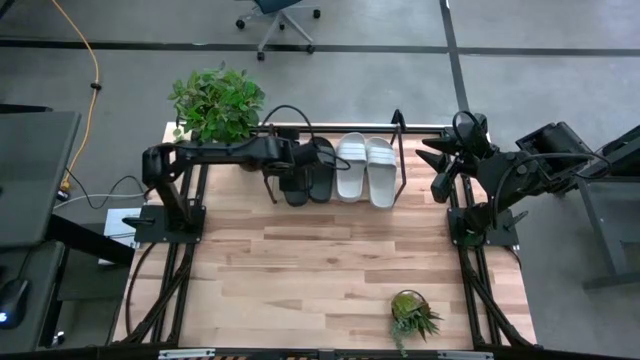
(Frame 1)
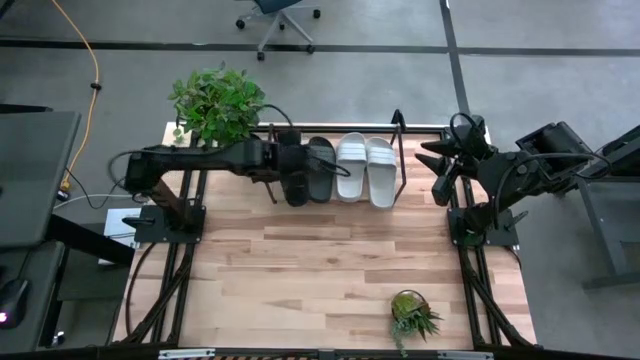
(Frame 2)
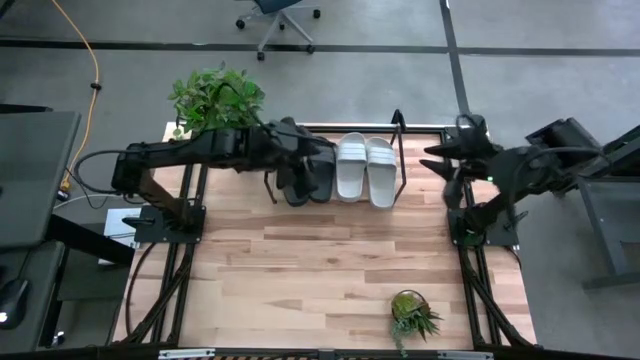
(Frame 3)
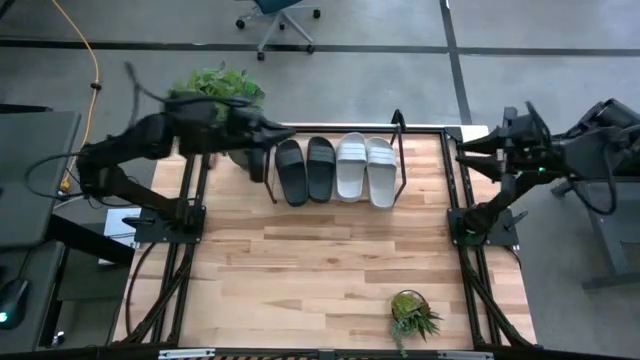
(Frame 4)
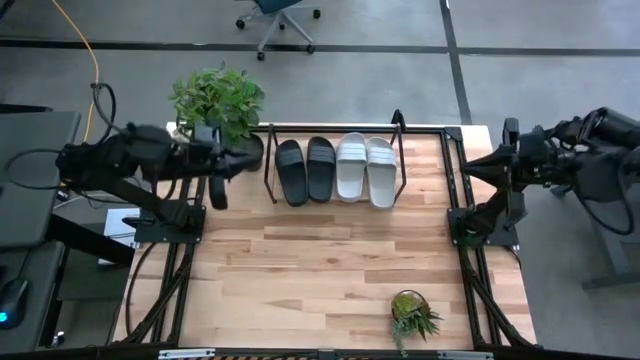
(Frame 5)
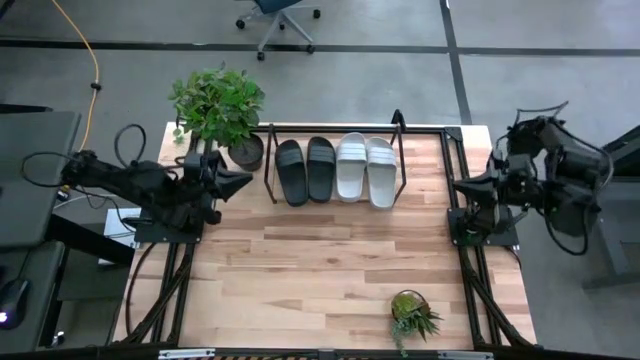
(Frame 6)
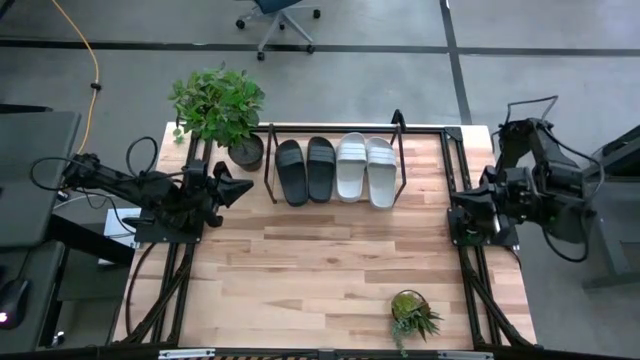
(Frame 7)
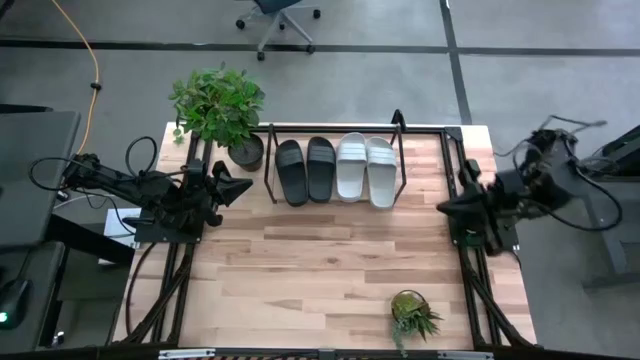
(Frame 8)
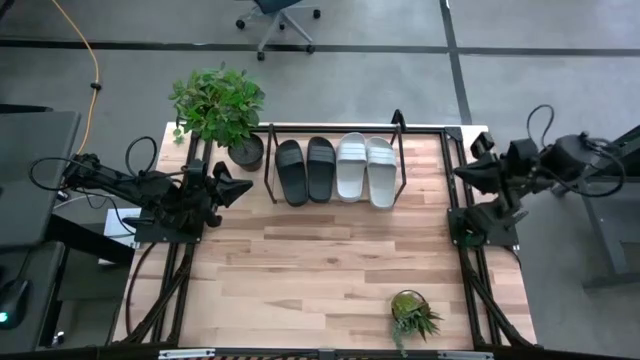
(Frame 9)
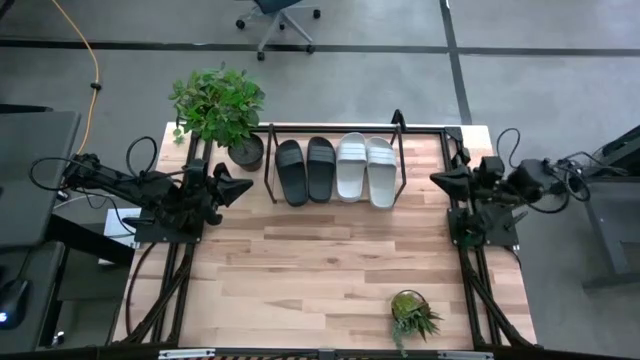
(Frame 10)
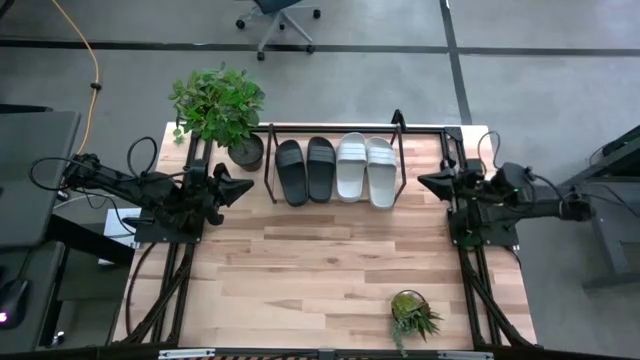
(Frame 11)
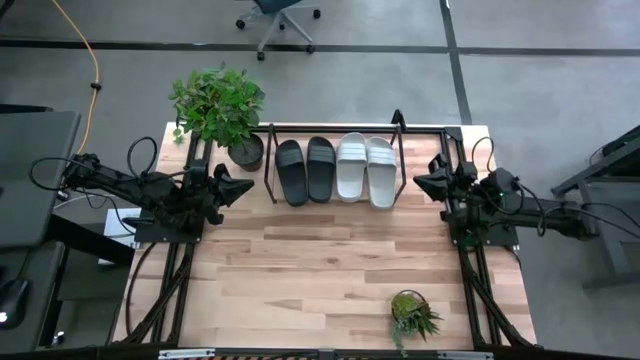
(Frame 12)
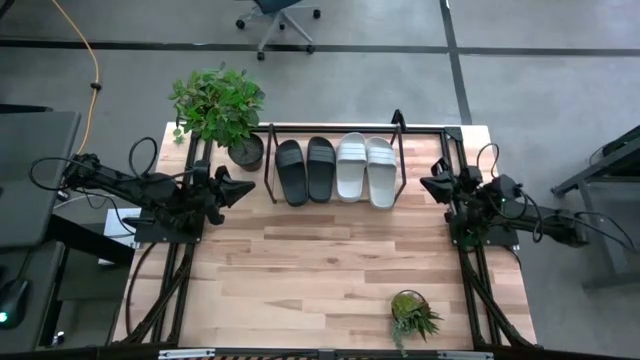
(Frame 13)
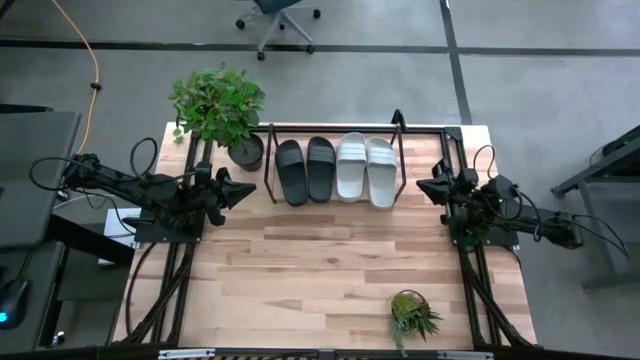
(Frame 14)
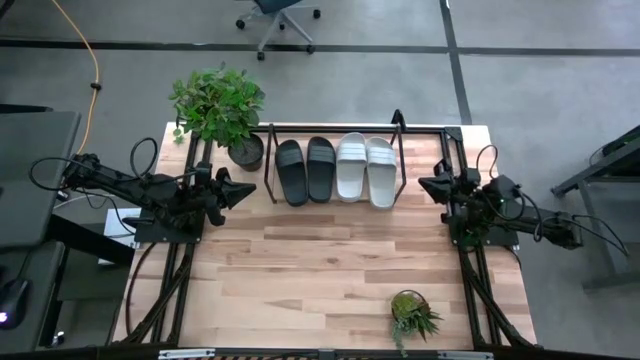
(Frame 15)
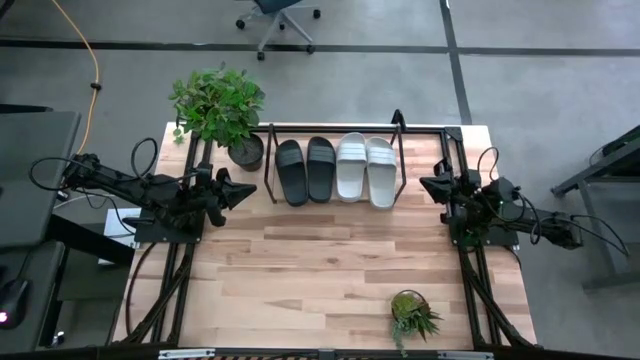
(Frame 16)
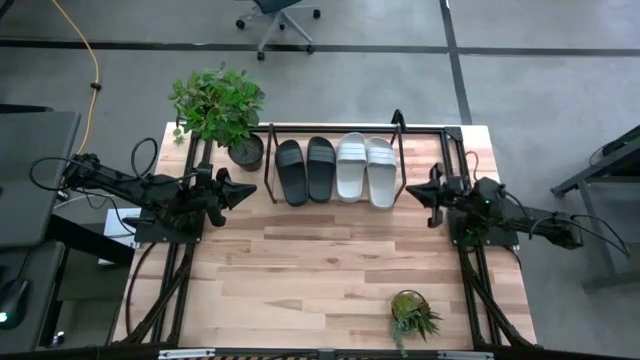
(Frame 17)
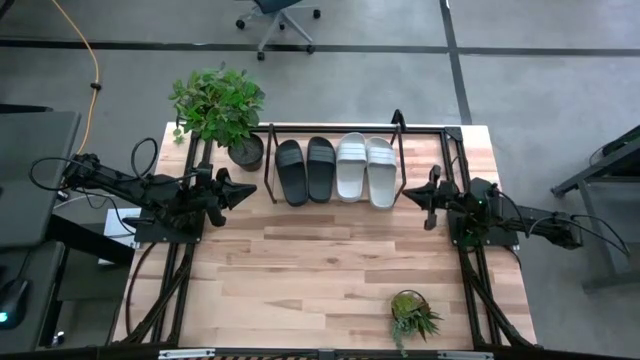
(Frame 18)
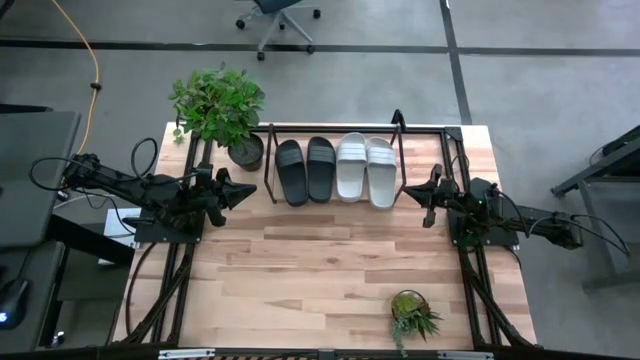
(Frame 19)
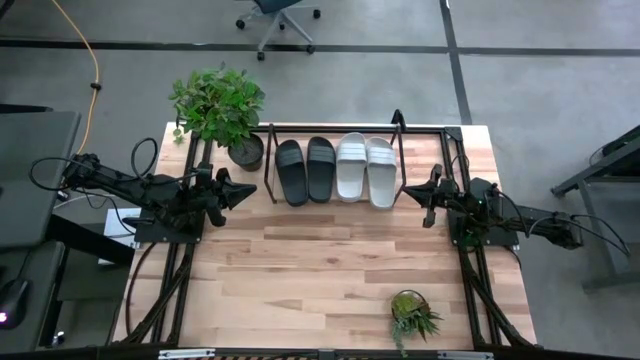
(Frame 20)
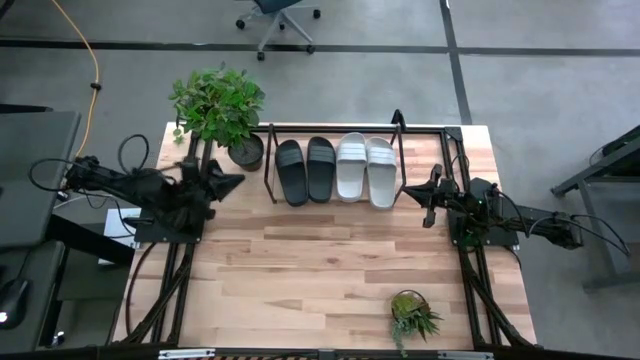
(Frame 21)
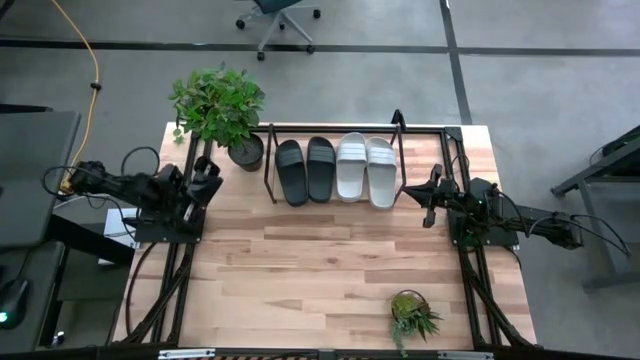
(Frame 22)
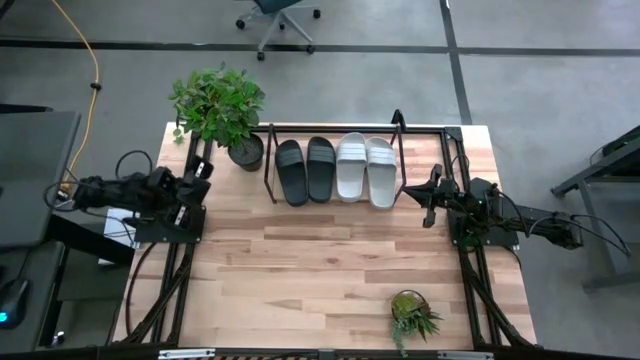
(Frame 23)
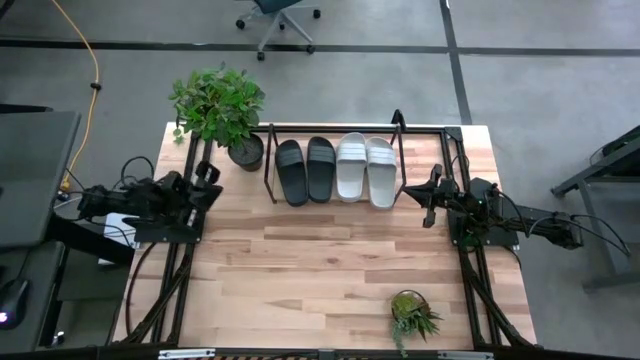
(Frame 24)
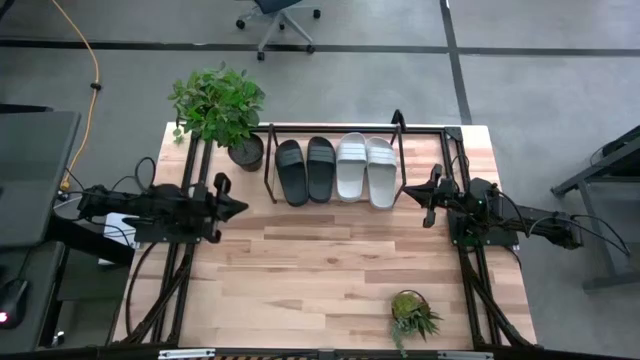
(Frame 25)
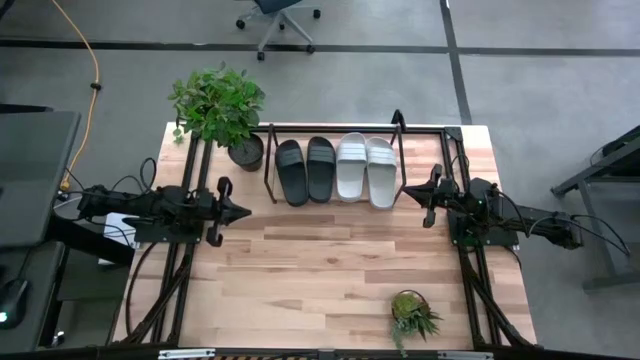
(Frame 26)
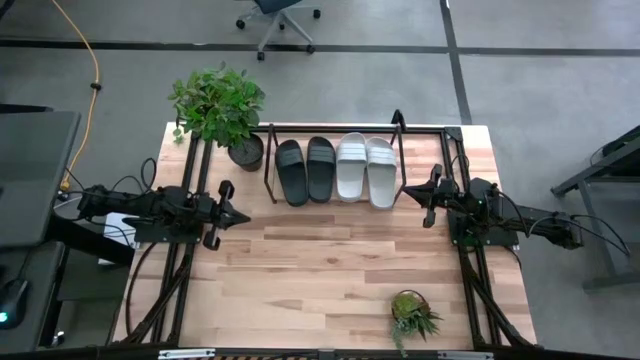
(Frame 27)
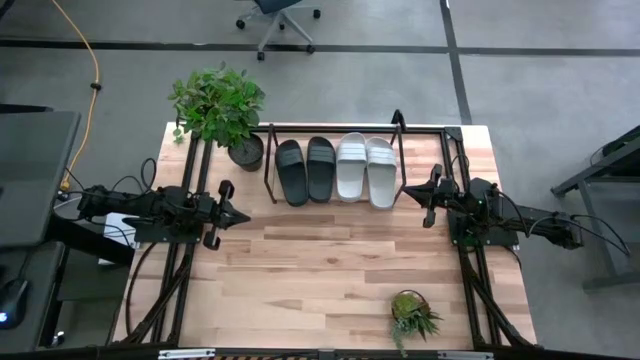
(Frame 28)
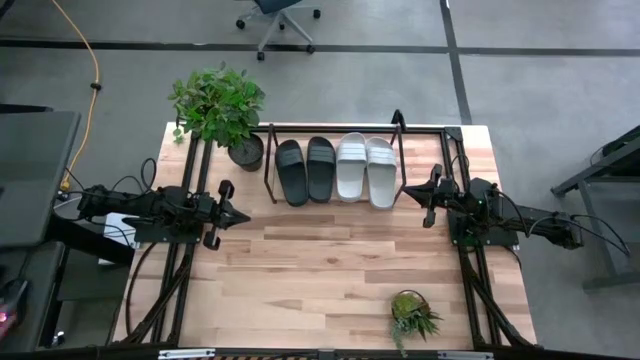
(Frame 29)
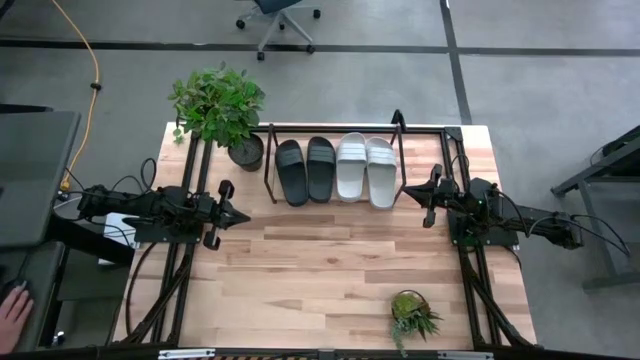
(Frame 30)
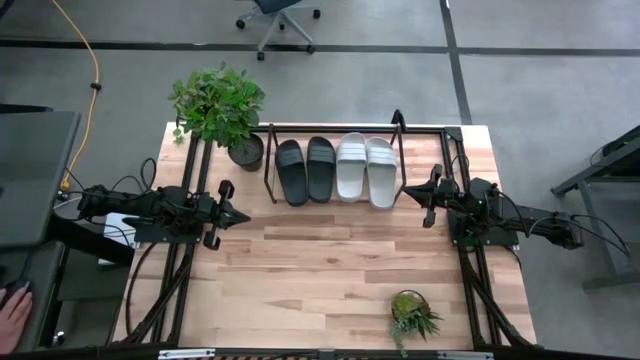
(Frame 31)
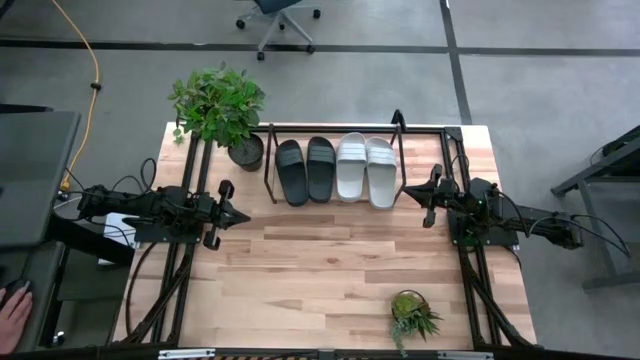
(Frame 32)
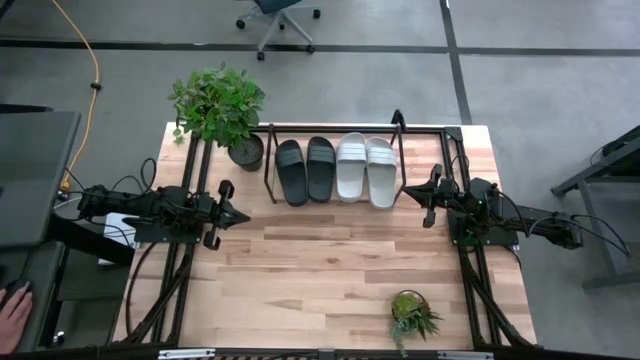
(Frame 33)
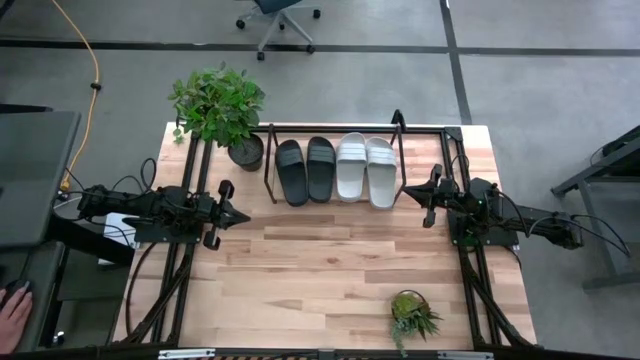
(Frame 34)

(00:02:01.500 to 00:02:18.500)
Task: Pick and place slides into the shelf
Return to Home Position
